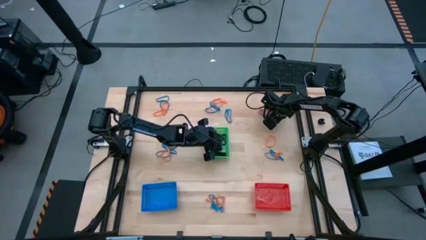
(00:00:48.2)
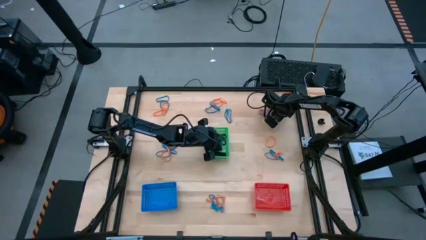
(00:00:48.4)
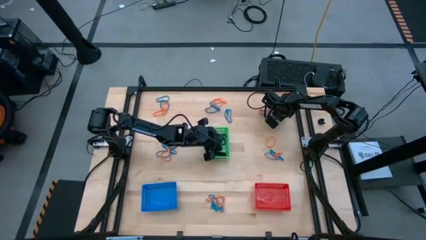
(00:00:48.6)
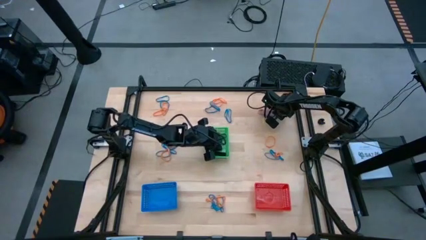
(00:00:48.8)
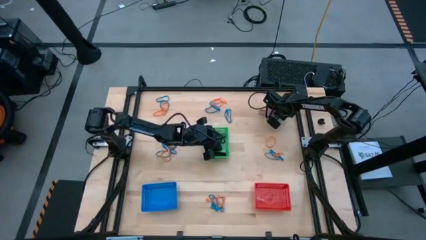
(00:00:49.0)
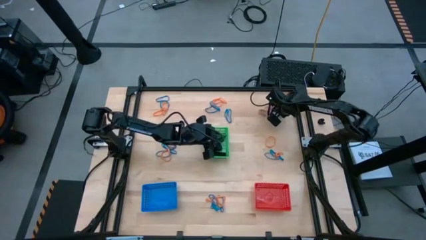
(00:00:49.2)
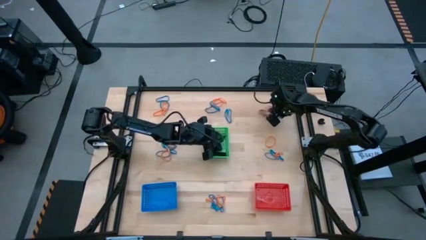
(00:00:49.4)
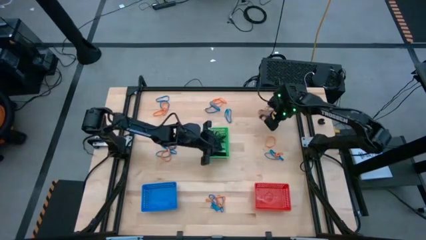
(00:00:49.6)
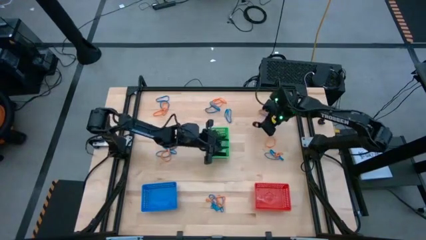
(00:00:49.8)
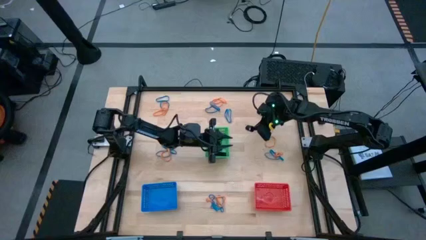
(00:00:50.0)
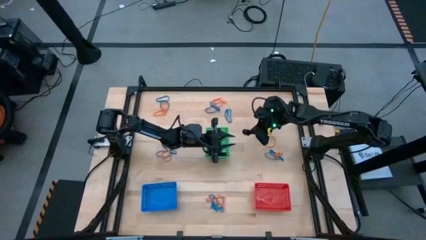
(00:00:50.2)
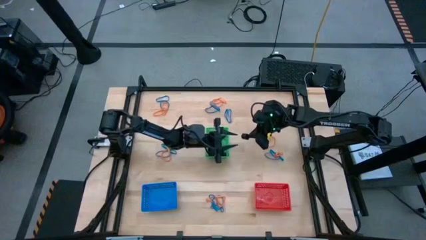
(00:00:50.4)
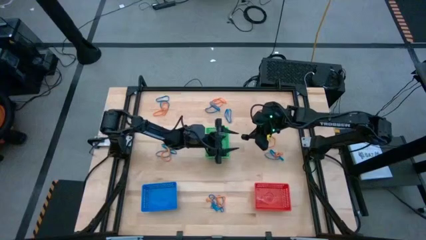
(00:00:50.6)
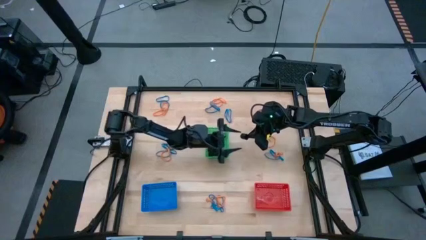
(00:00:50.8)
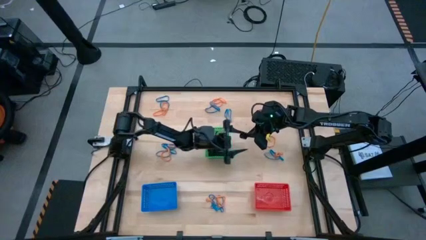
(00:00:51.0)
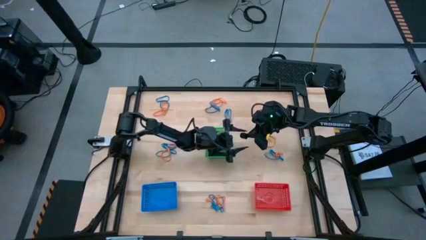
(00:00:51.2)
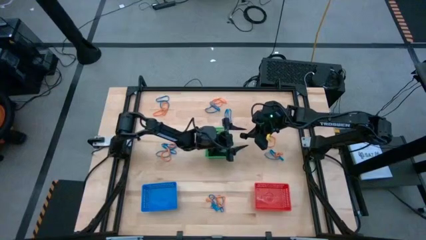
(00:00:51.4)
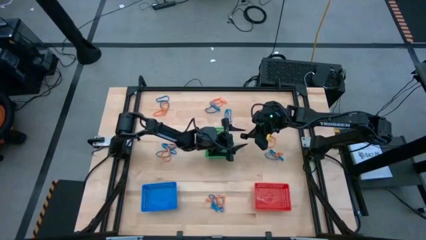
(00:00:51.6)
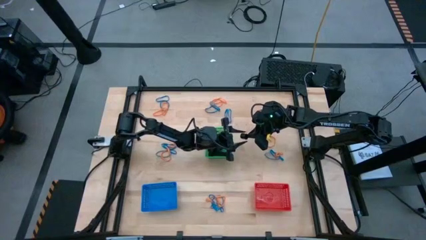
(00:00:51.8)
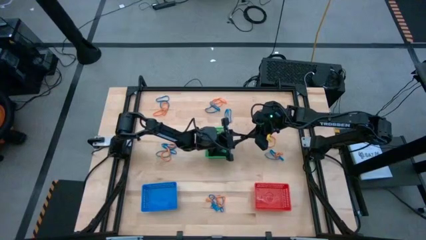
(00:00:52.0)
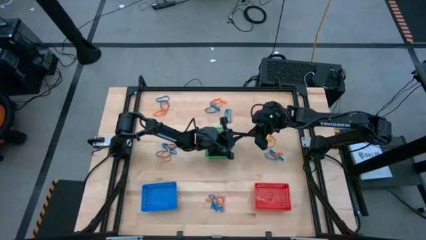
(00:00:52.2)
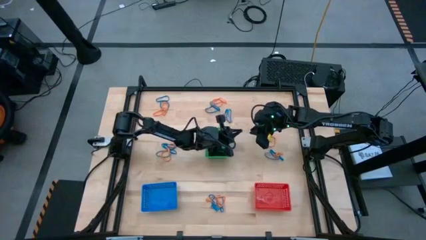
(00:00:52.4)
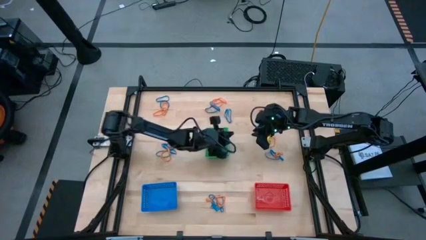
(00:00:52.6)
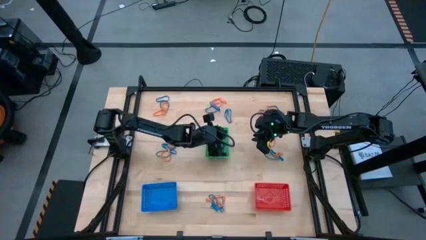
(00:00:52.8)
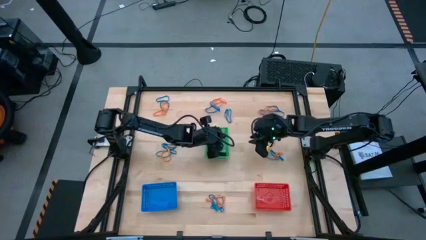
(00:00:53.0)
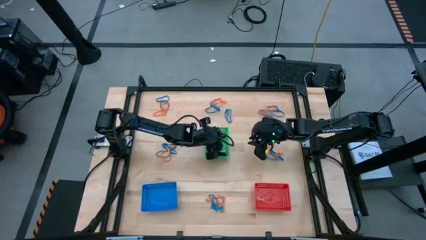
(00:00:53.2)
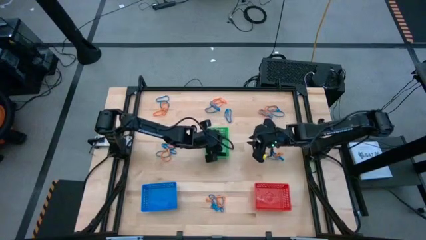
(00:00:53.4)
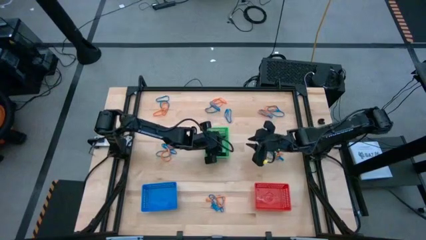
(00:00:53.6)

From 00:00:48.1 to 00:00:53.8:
Task: Sort rubber bands into baskets
Put the black rubber band into the green bin

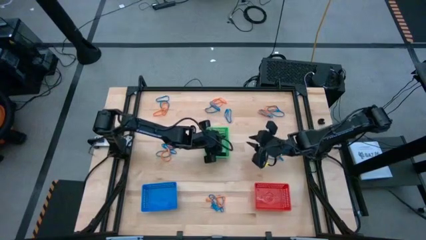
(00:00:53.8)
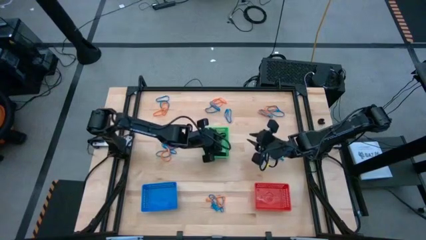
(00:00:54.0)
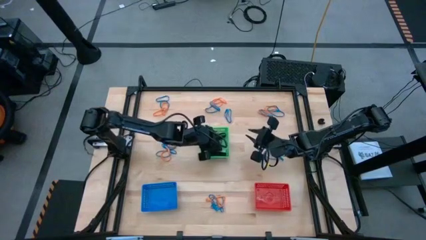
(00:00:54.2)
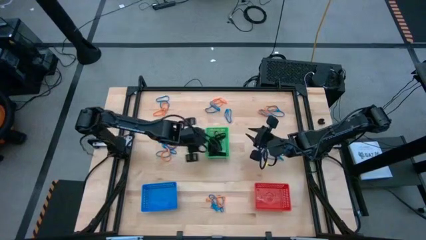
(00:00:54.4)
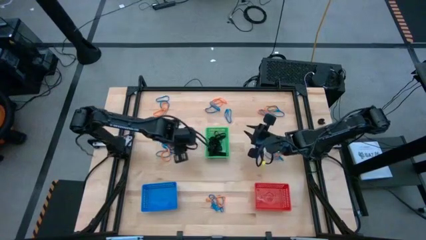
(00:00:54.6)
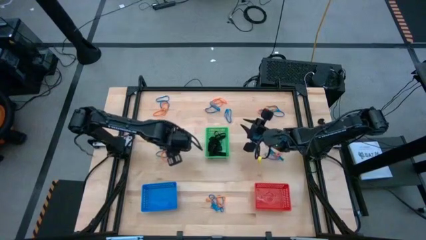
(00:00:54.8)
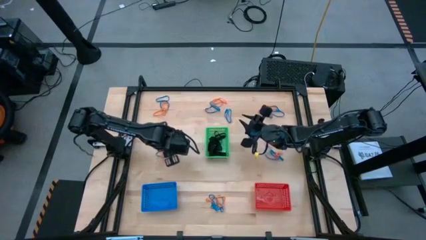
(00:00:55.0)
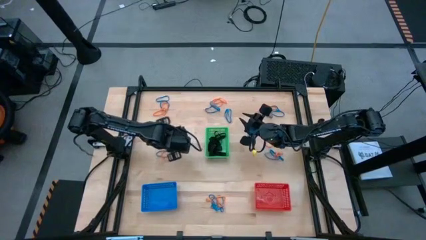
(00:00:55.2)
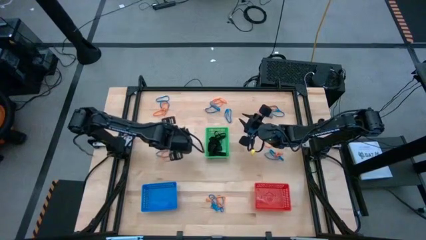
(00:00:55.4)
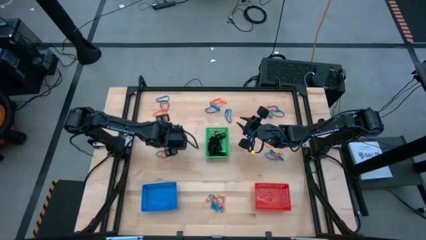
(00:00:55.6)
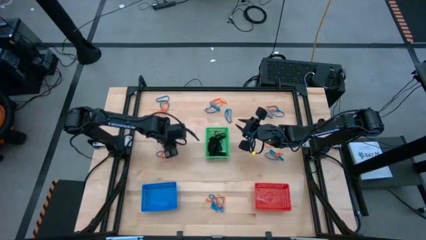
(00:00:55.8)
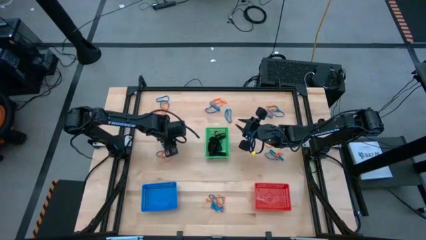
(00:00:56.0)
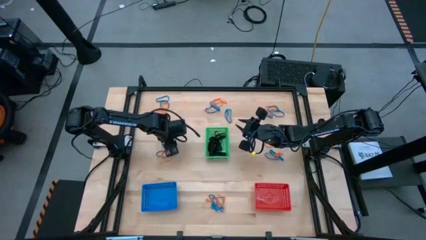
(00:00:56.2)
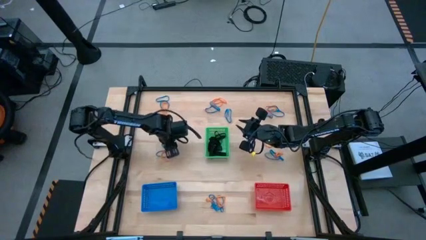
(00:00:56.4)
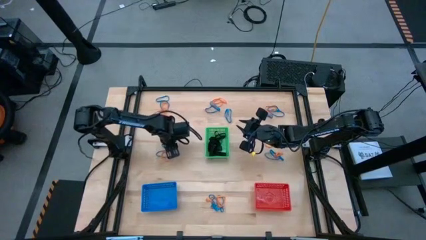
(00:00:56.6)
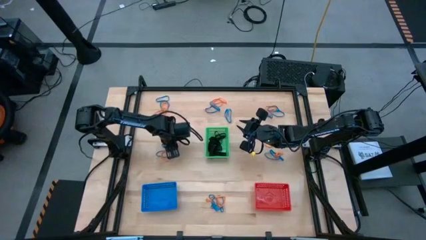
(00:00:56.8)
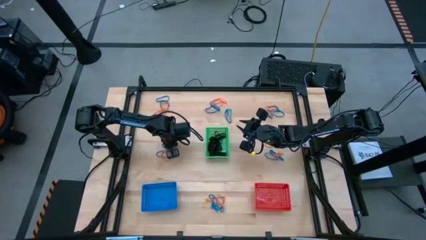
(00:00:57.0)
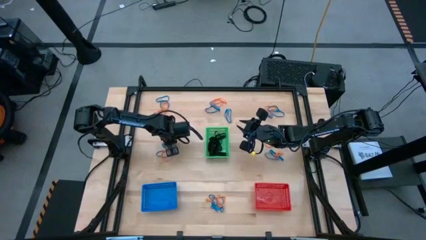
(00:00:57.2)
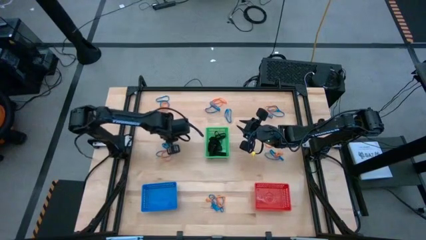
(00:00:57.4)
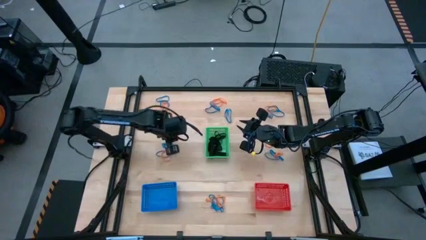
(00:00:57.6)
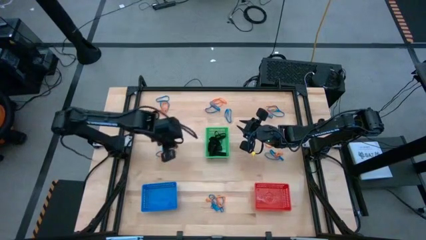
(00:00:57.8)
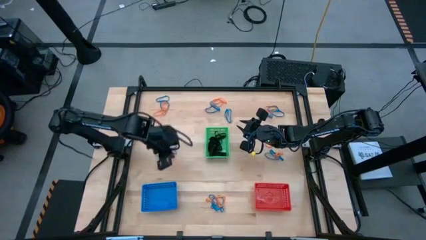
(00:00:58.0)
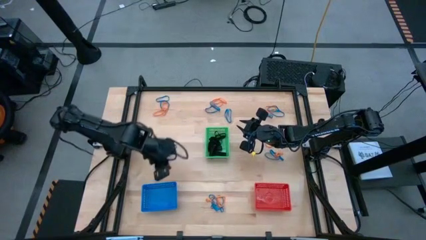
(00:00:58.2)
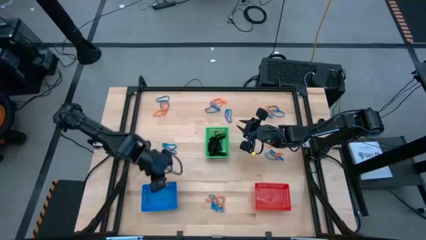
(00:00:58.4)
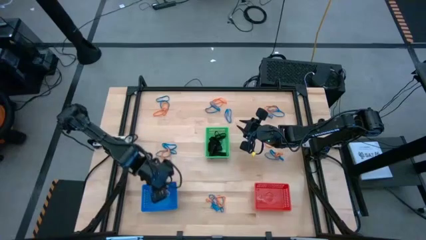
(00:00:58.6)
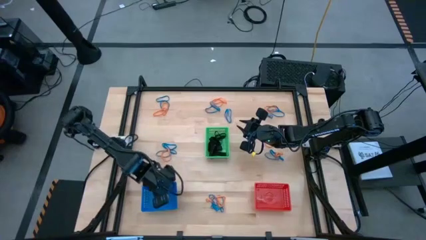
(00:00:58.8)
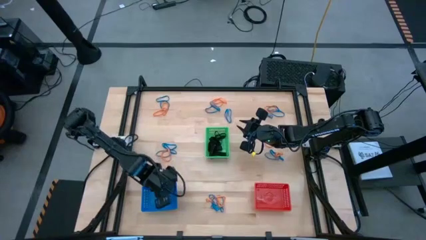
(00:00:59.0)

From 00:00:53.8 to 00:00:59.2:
Put the orange rubber band into the blue bin

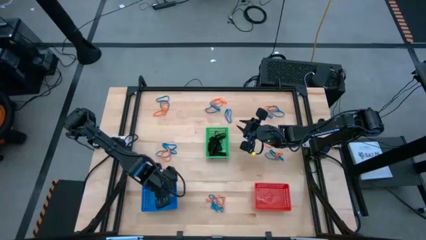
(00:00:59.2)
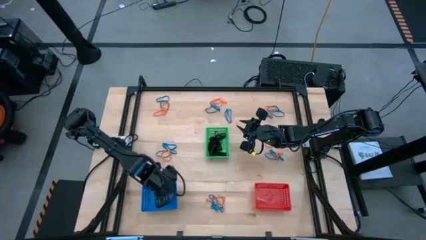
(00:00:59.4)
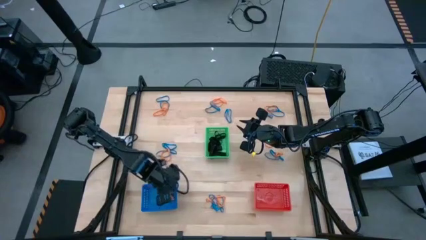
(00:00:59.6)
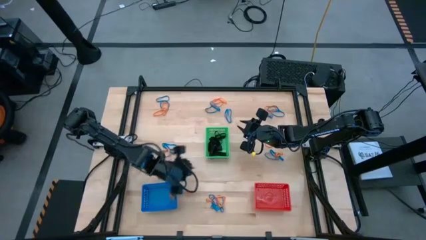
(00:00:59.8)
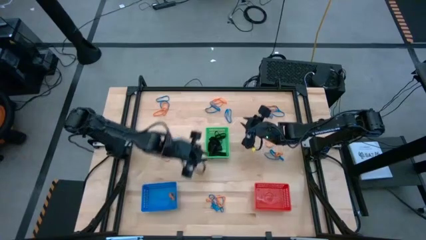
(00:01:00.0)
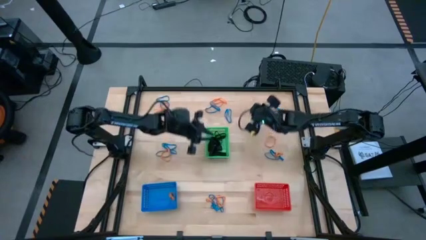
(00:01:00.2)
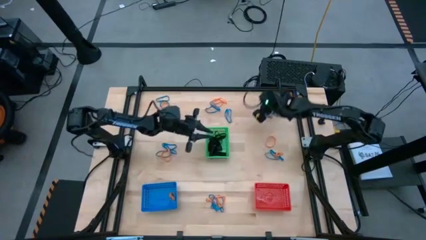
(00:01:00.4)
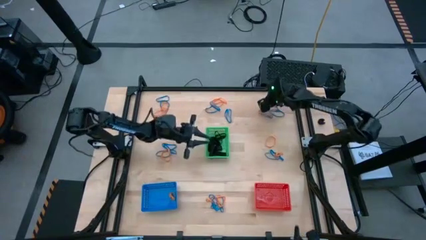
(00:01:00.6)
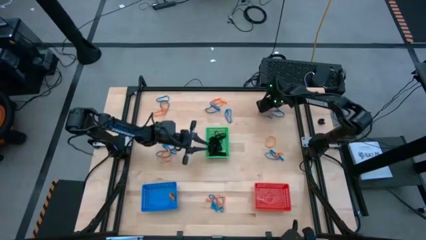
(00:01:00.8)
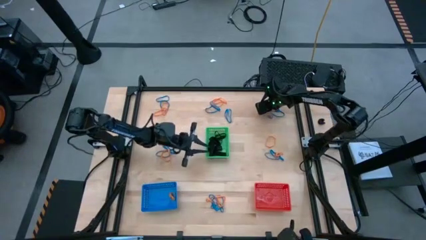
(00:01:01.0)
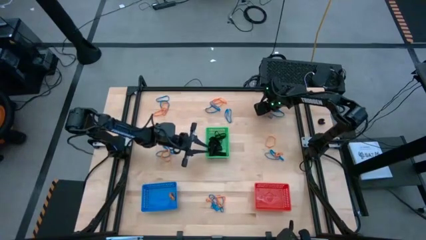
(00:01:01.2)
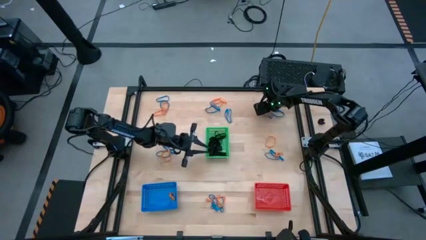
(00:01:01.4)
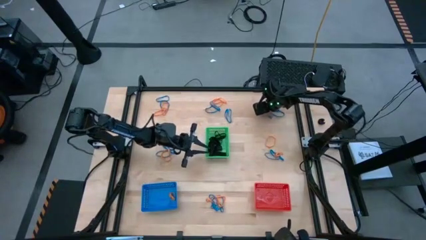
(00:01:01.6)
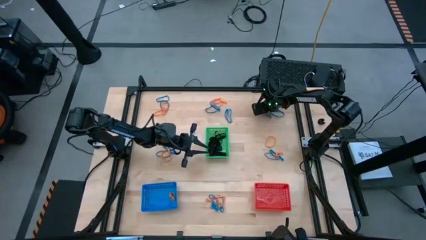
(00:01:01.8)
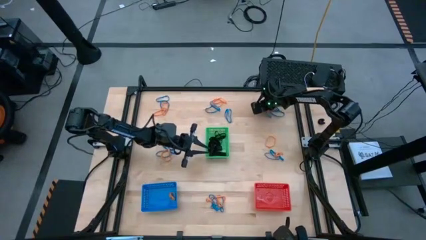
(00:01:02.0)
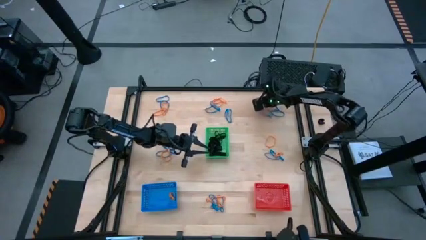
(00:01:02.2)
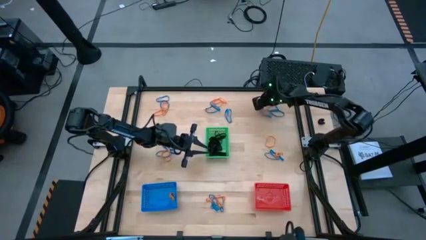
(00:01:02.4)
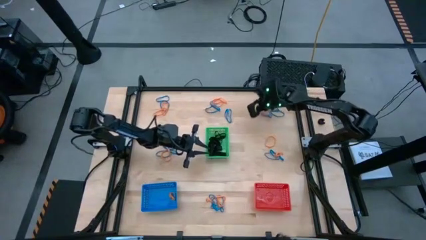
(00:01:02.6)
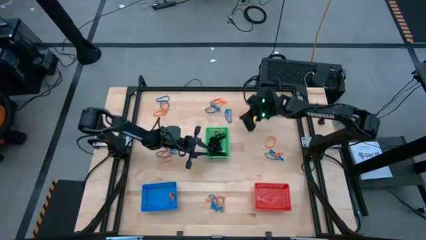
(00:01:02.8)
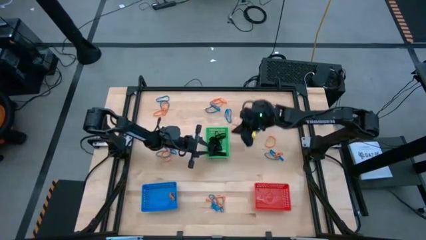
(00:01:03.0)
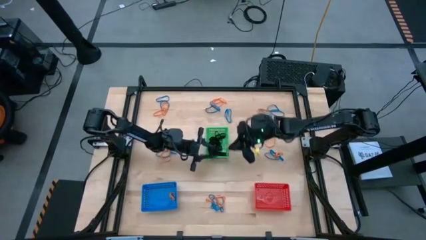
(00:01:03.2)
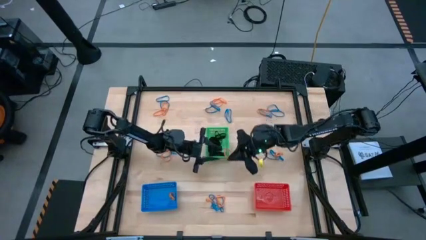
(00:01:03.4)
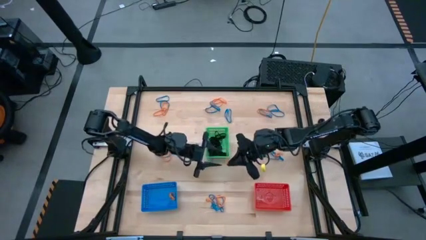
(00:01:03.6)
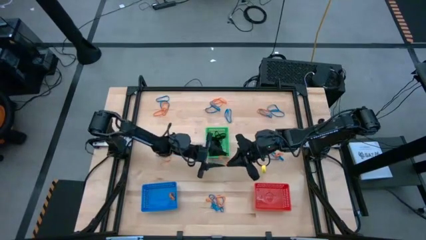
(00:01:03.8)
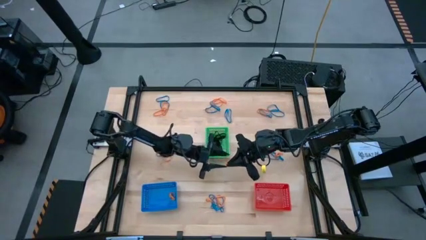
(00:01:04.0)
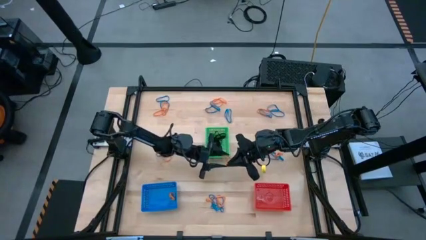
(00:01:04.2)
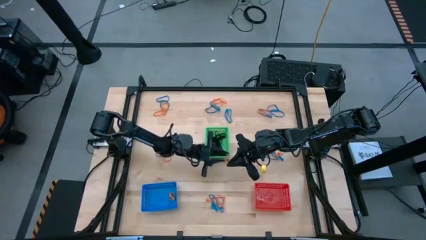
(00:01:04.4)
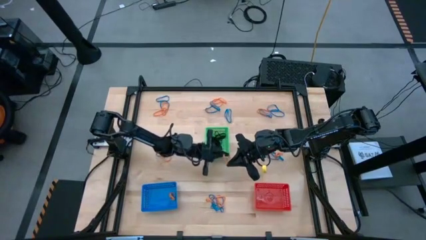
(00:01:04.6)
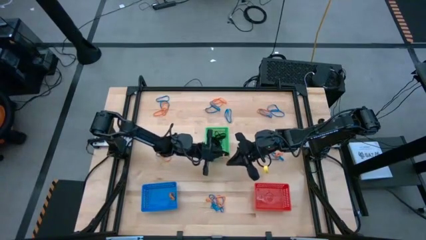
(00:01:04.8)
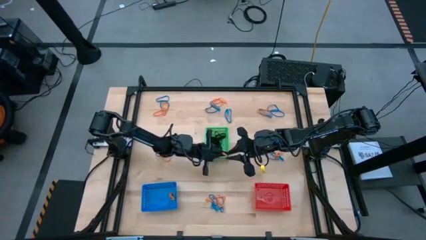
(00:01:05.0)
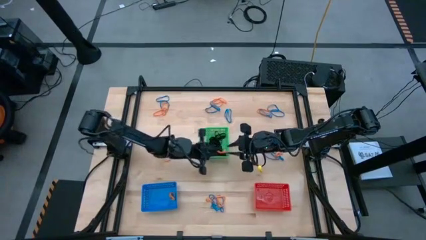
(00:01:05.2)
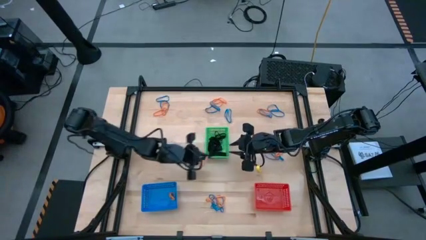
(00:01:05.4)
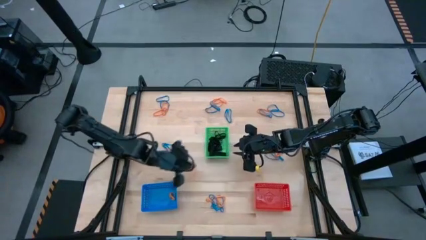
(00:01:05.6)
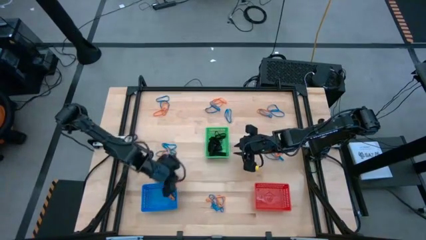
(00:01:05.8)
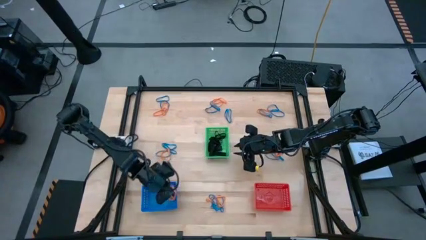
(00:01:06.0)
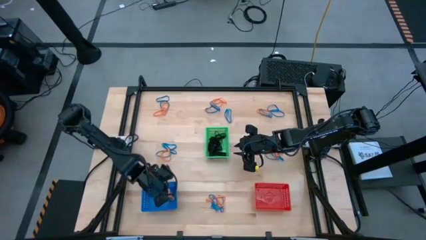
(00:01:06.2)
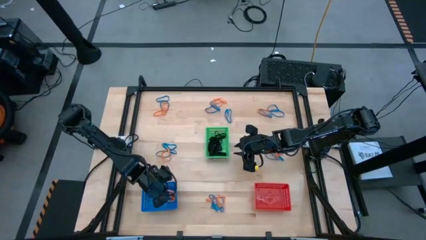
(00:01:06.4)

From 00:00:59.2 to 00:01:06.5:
Put the orange rubber band into the blue bin
